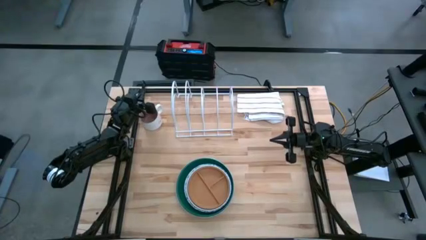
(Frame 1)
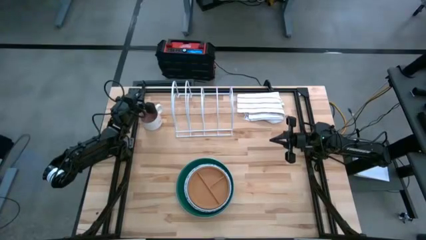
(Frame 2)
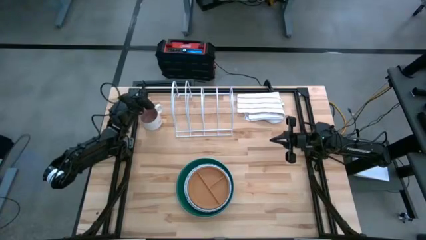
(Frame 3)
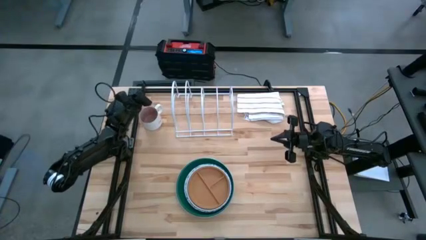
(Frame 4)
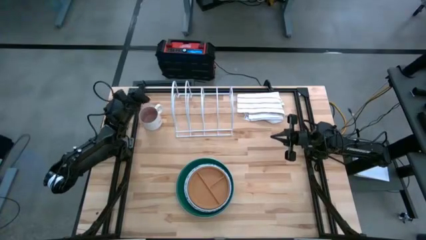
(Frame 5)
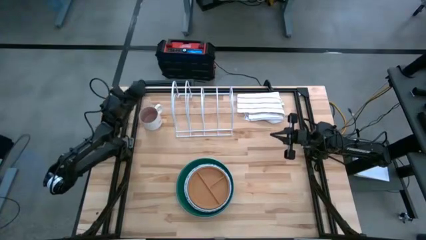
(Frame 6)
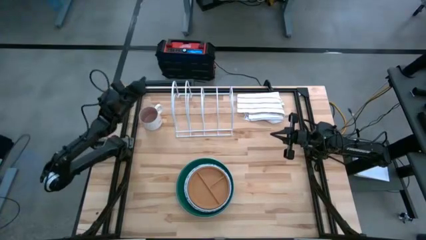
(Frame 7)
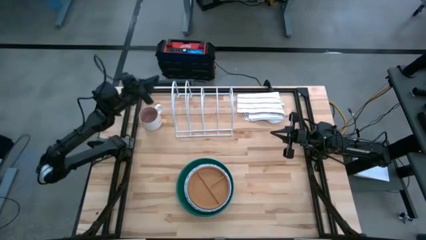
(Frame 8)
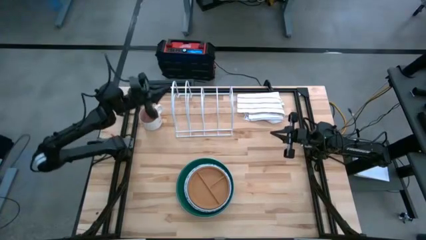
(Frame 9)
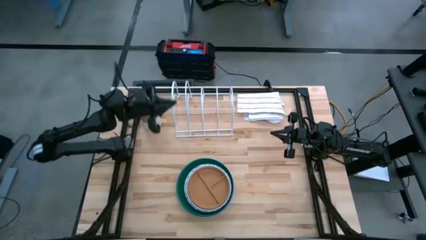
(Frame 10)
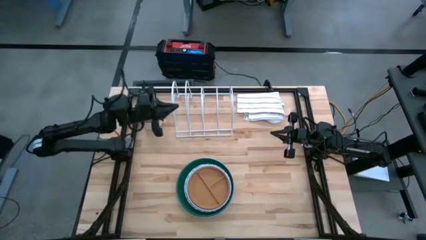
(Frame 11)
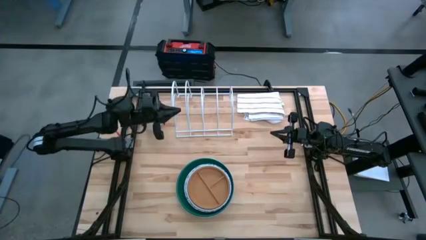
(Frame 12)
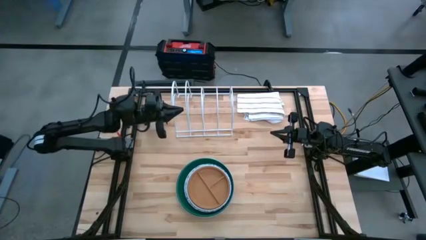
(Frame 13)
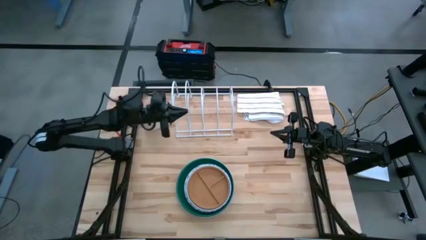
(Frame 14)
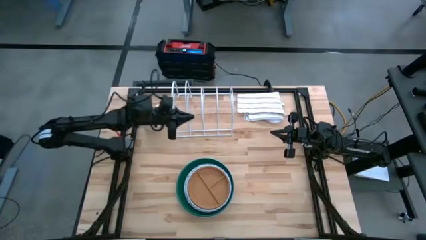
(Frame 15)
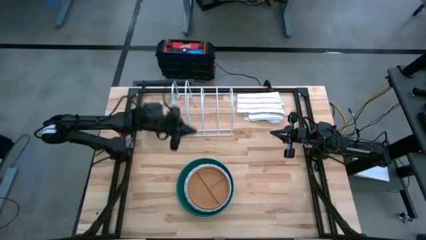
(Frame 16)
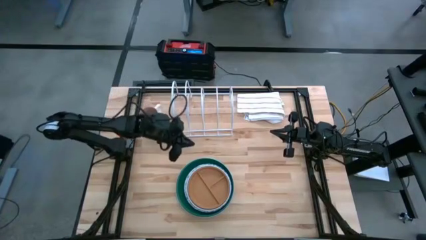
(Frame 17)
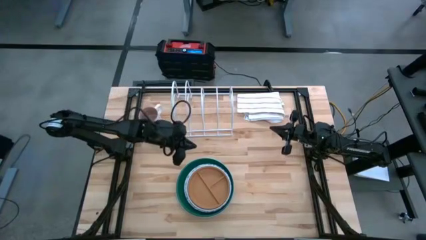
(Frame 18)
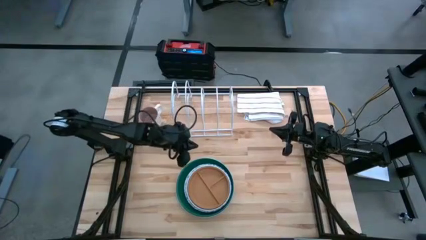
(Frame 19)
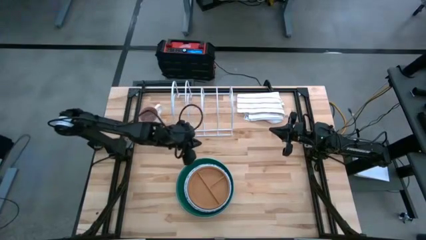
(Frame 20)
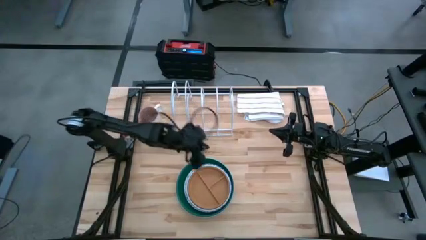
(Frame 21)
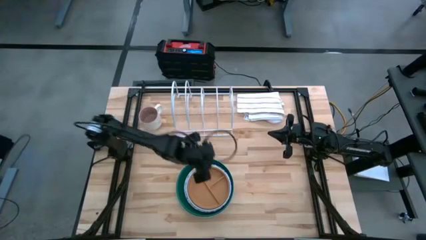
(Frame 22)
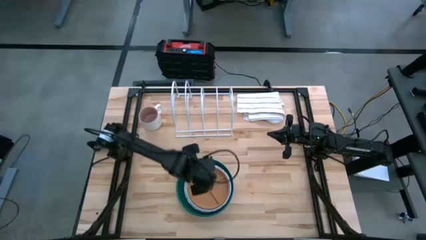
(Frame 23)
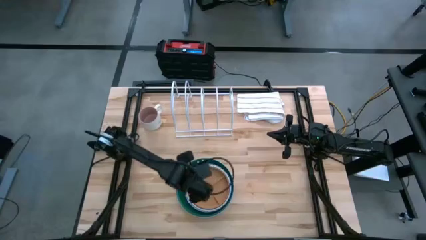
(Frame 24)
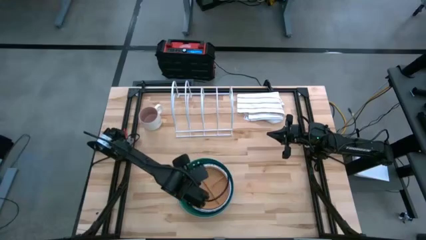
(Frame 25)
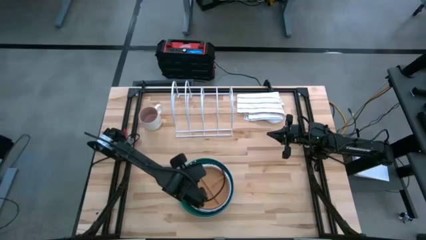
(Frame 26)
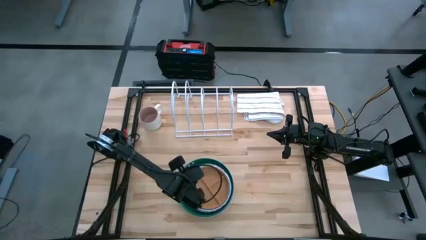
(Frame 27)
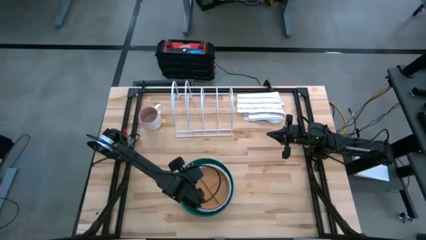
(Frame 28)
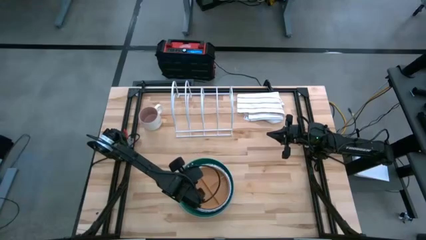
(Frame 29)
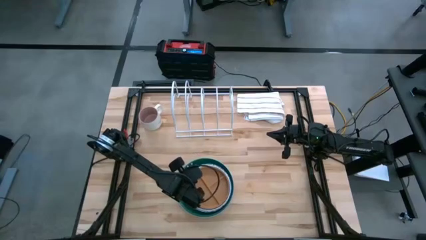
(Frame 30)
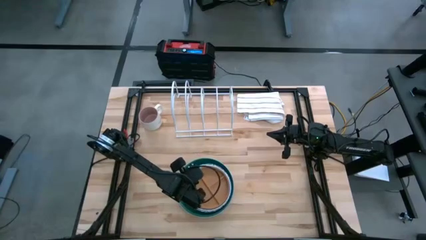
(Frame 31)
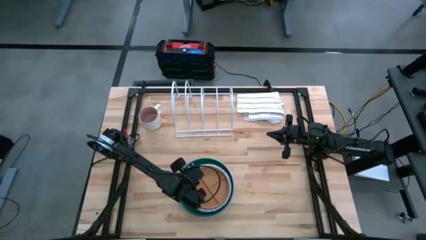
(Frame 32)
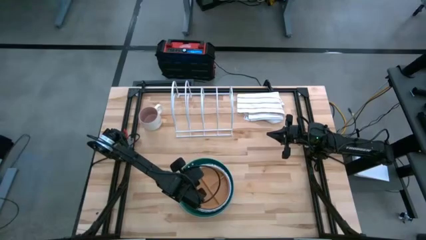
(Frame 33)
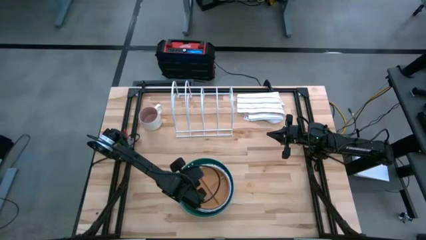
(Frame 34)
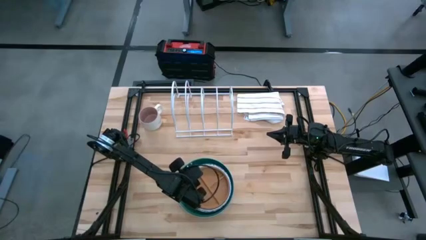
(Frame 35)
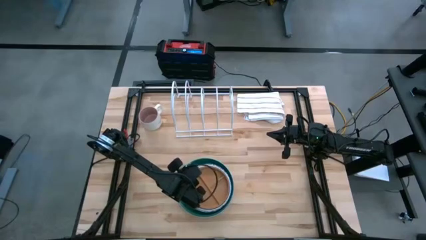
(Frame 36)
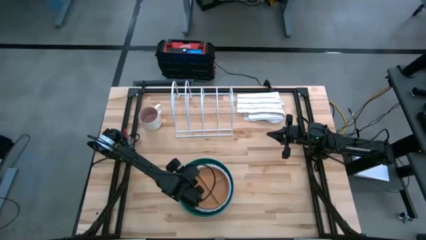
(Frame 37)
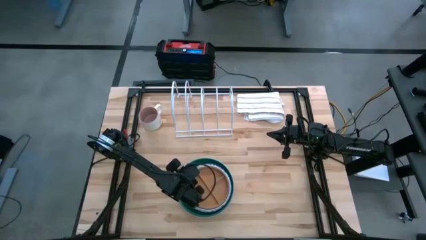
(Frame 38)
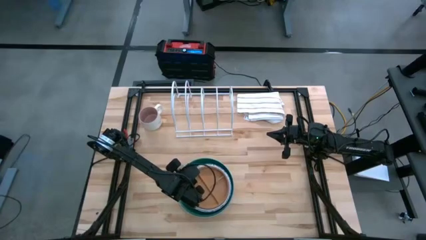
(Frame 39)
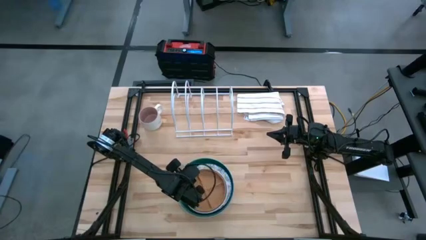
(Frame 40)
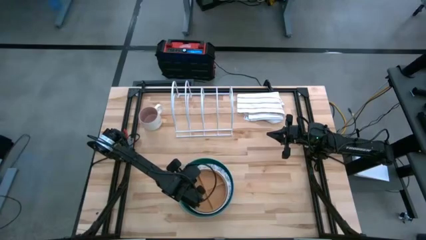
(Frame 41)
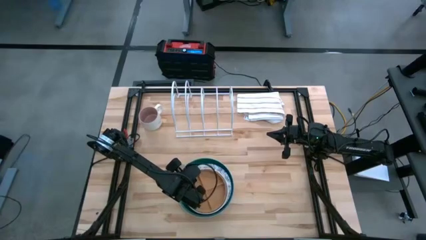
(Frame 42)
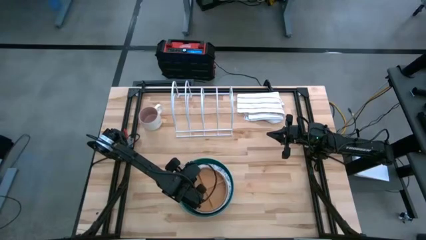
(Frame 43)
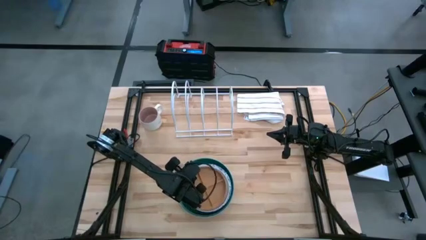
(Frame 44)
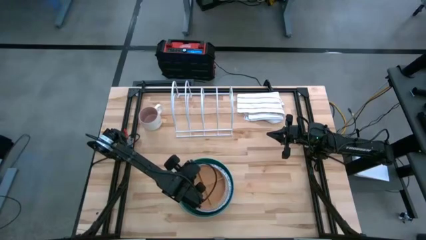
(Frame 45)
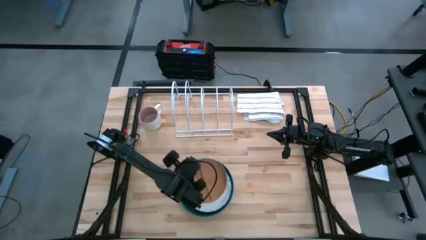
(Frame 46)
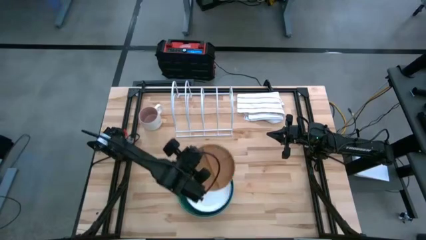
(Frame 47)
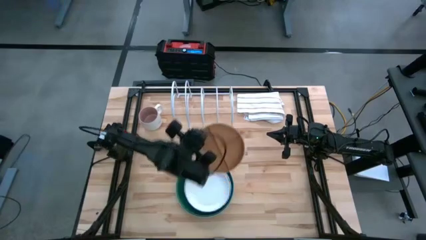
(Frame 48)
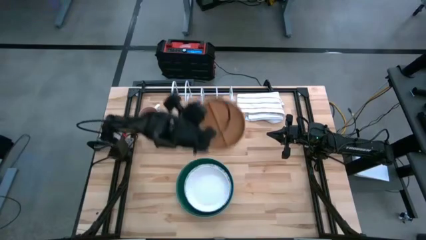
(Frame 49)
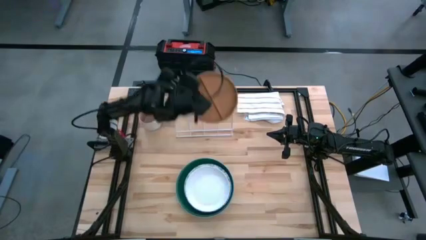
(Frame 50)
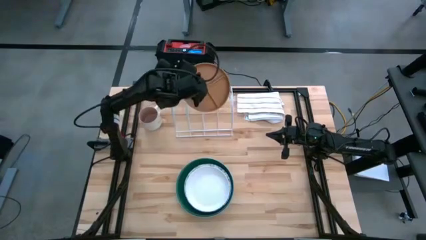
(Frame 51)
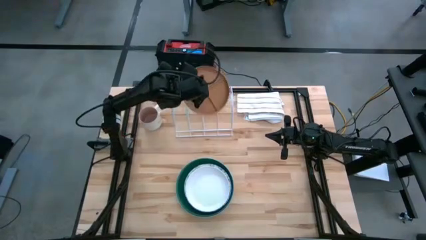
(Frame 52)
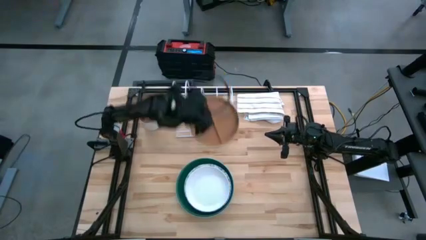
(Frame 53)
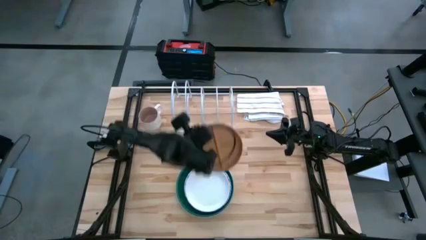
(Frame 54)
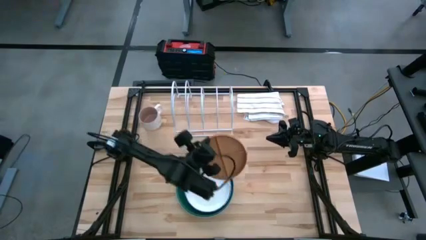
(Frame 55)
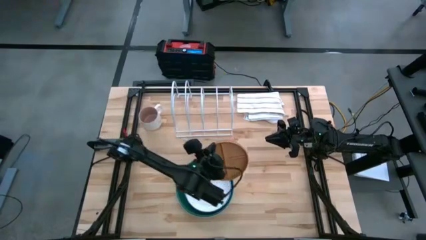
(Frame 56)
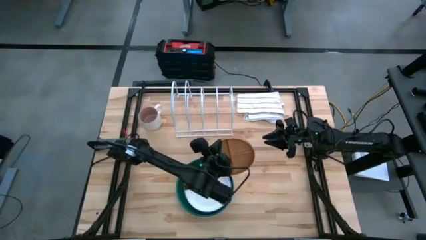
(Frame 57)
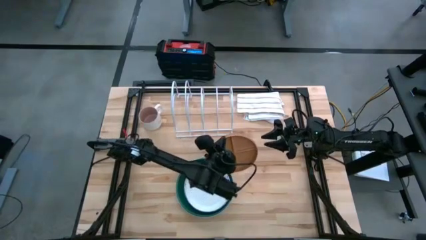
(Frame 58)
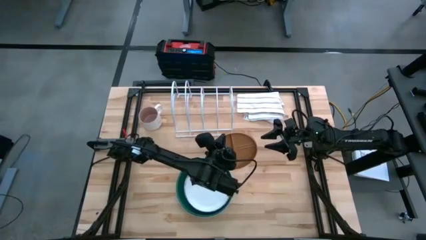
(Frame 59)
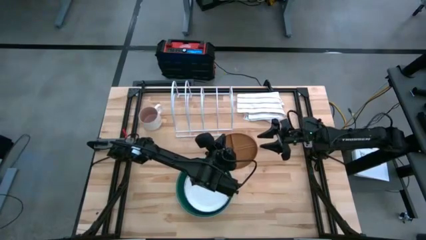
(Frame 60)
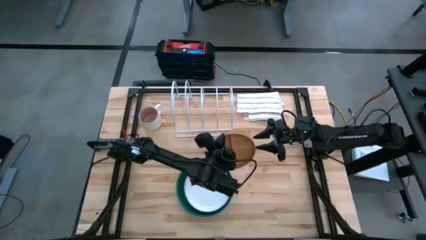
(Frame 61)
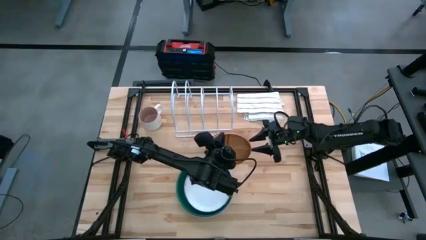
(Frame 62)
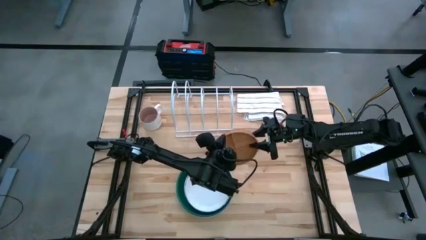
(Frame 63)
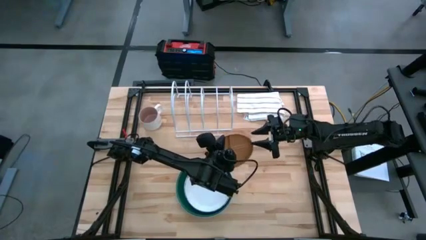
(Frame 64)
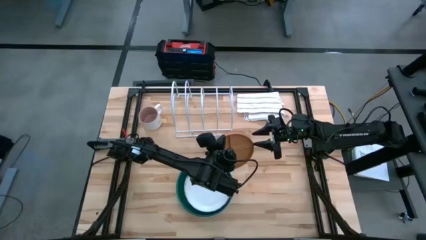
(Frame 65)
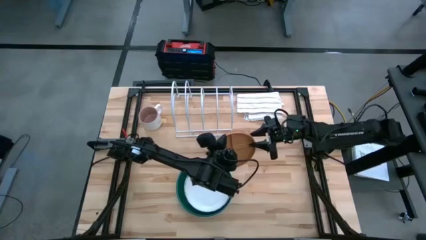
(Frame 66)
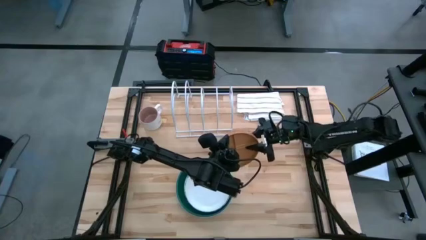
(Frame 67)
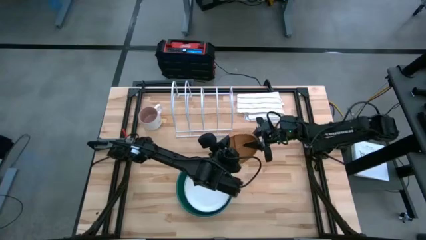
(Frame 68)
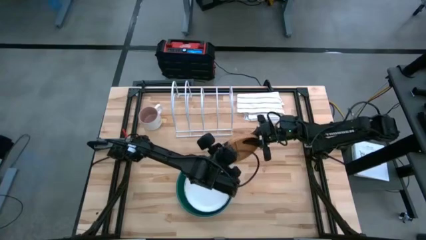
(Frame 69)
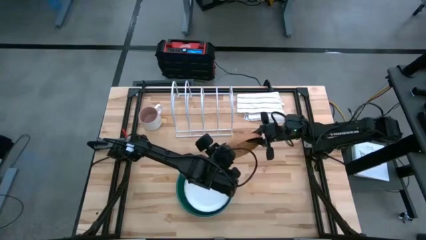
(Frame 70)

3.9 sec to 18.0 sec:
Task: Sort dishes
Put the brown plate into the dishwasher rack
